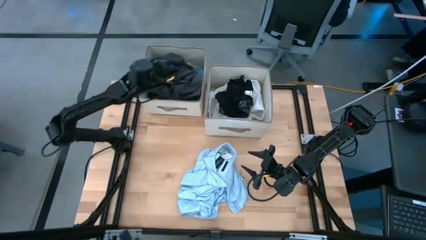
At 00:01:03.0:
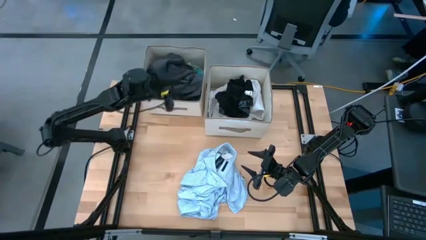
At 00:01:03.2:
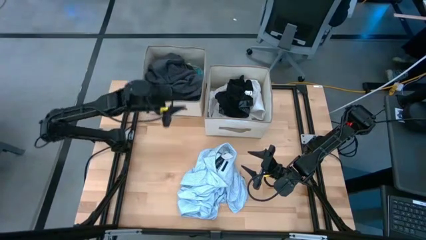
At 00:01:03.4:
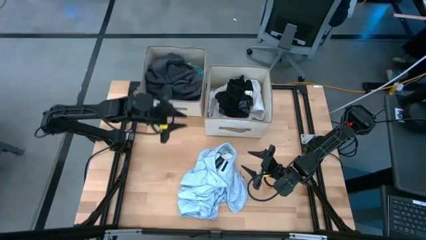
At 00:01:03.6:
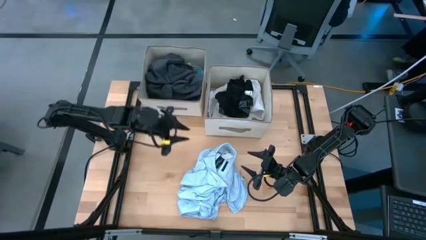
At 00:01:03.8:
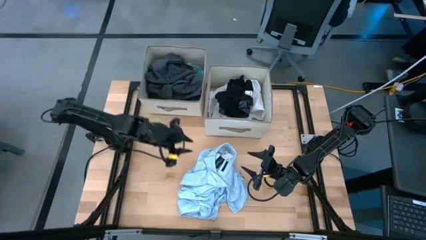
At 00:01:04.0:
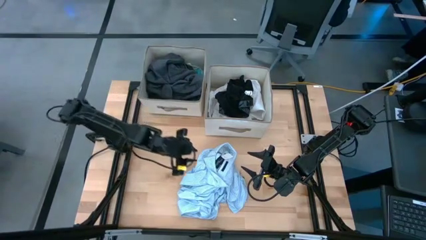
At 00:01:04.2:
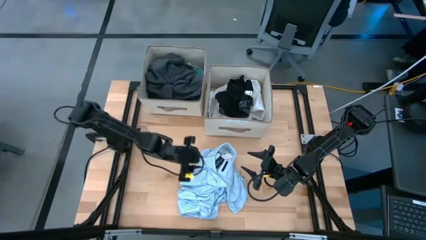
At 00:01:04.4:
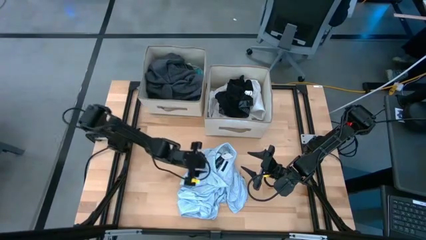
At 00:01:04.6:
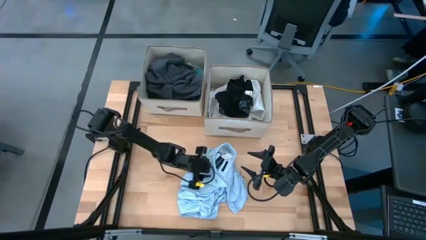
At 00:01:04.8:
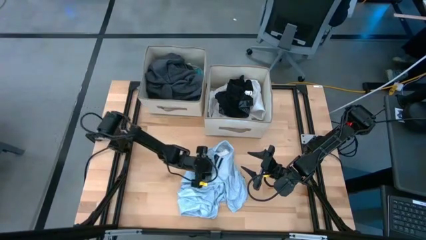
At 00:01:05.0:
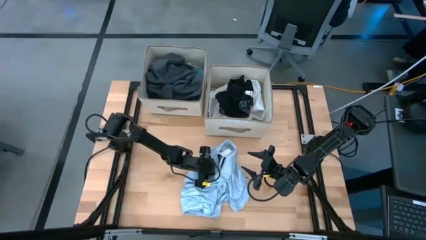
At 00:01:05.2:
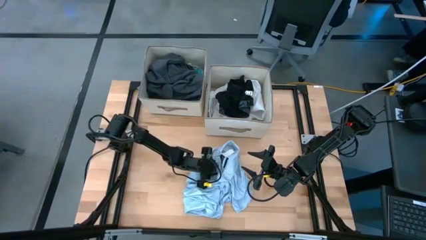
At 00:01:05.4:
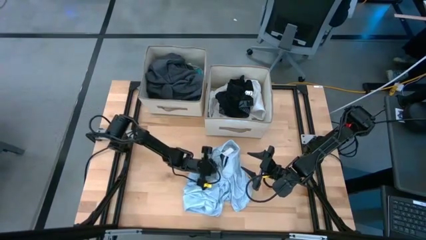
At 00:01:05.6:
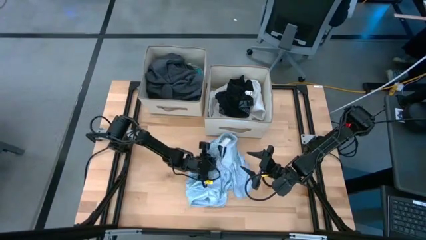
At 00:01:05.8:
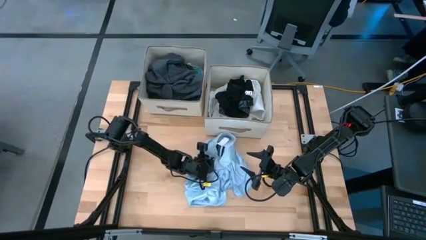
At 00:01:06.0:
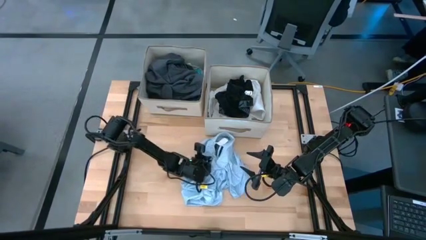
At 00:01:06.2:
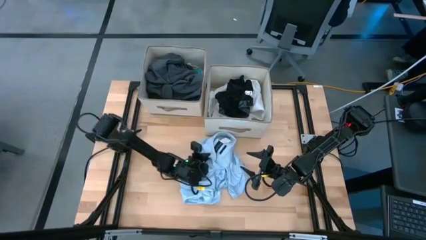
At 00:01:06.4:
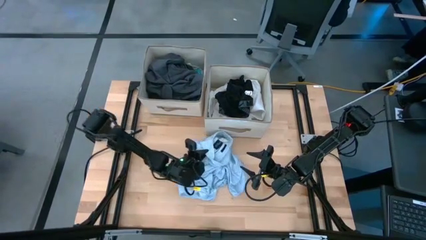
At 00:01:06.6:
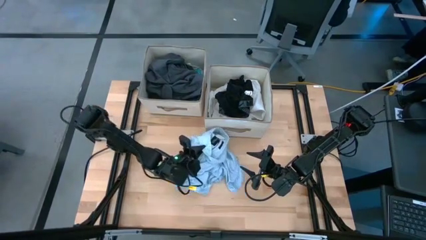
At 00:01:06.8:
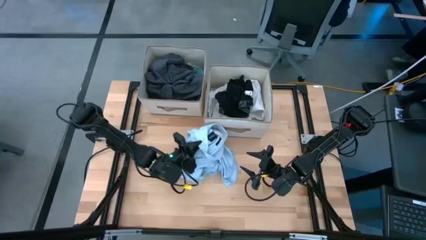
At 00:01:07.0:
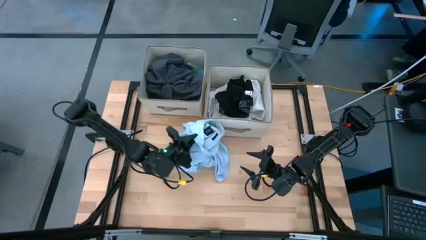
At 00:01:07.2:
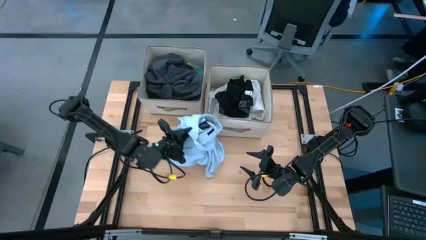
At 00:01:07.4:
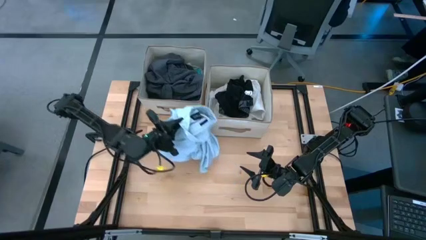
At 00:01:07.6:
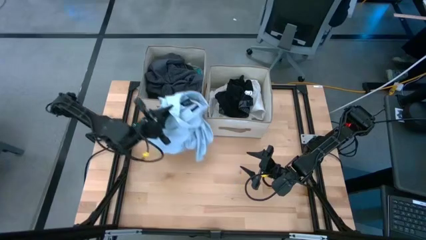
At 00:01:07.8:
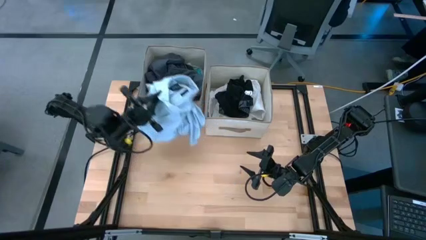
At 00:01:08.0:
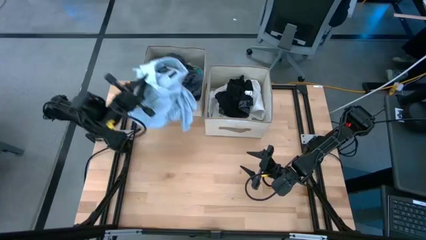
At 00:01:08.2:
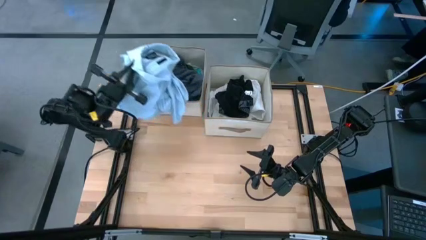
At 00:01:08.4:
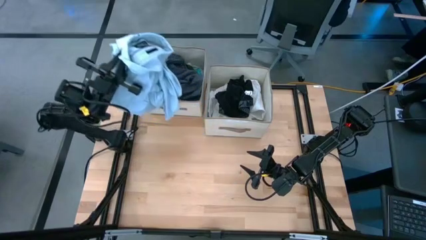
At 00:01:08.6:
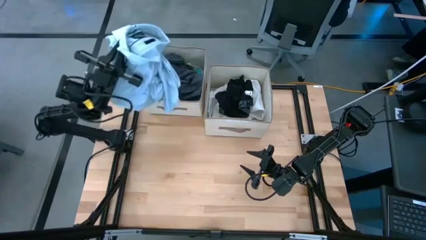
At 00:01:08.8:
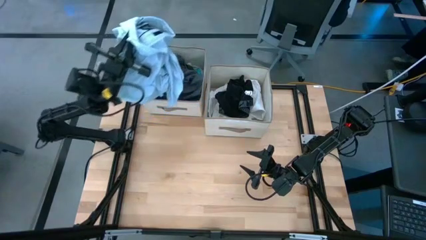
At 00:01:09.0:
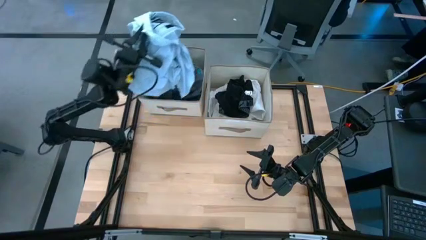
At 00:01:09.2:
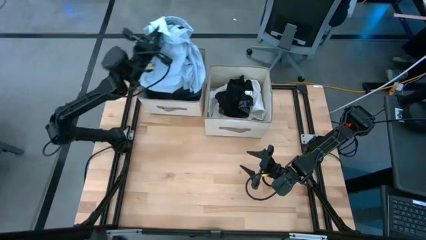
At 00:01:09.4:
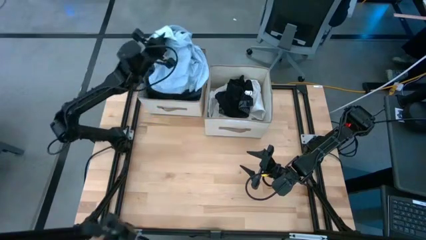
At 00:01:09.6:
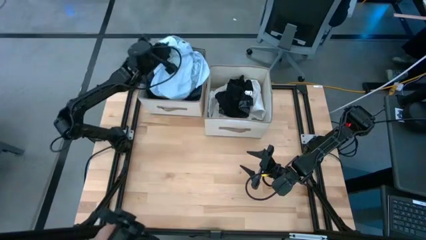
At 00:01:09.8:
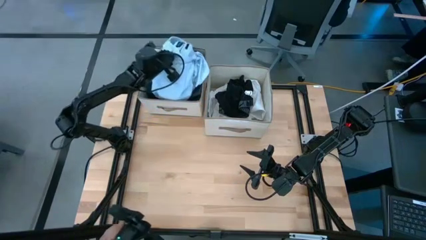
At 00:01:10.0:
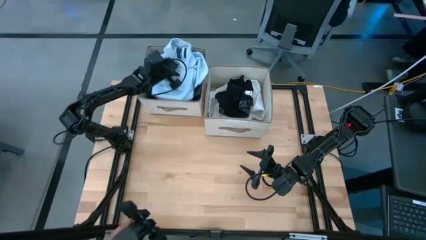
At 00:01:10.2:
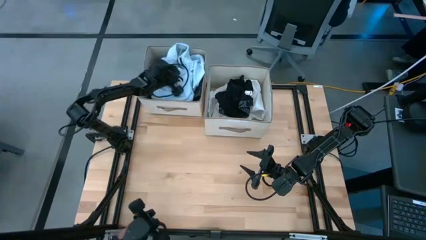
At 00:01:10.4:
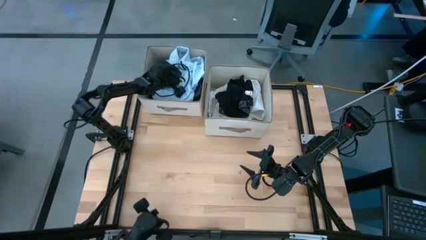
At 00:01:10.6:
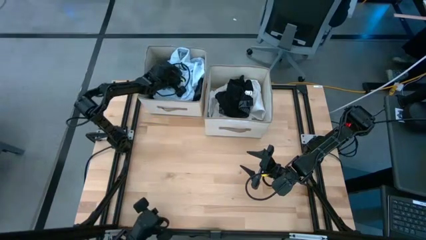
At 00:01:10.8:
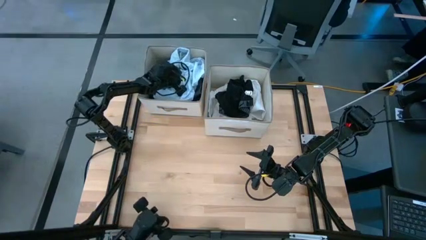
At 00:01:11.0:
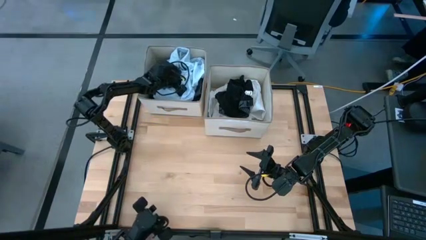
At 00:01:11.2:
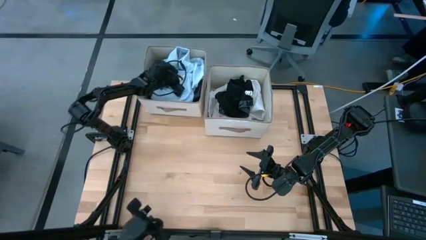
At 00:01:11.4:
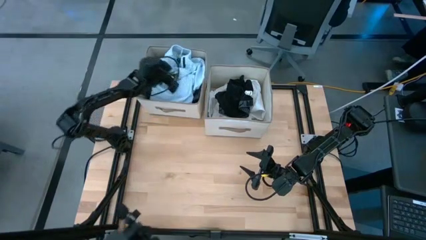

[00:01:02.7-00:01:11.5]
Task: Sort clothes
Put the blue polo shirt into the left laundry organizer

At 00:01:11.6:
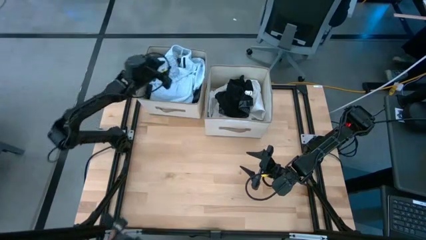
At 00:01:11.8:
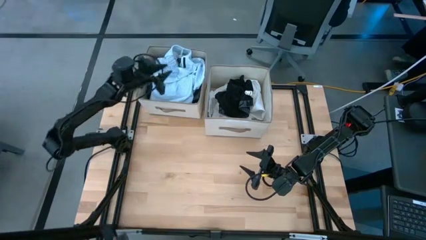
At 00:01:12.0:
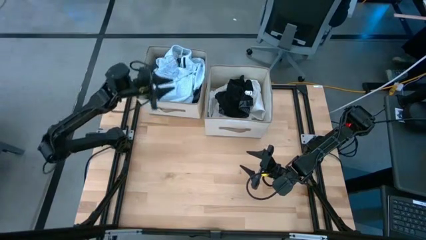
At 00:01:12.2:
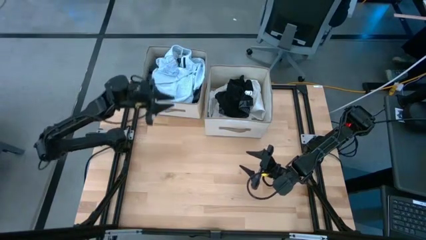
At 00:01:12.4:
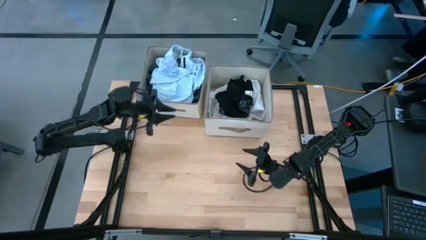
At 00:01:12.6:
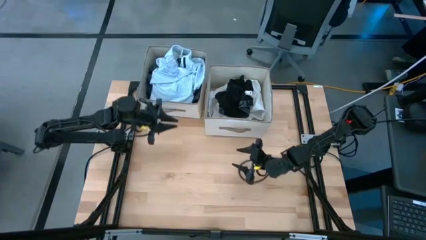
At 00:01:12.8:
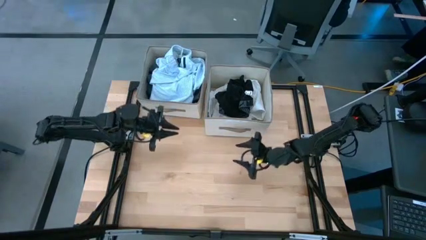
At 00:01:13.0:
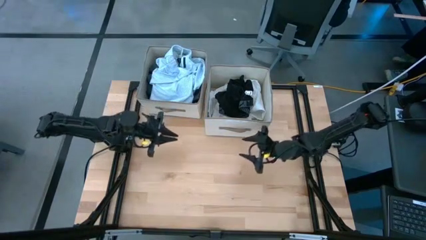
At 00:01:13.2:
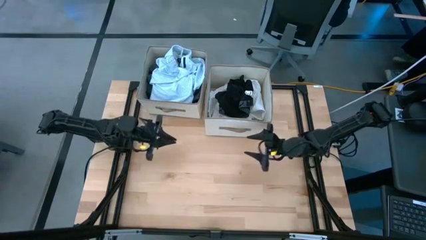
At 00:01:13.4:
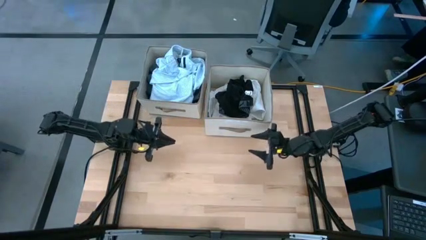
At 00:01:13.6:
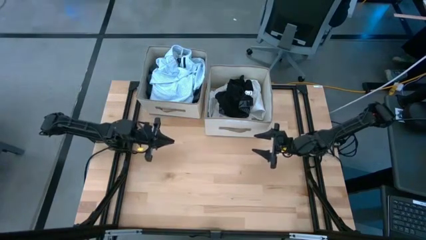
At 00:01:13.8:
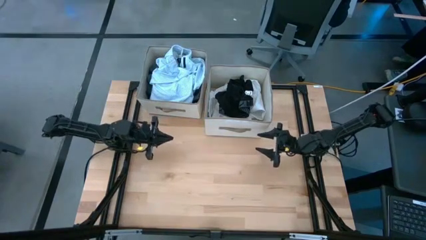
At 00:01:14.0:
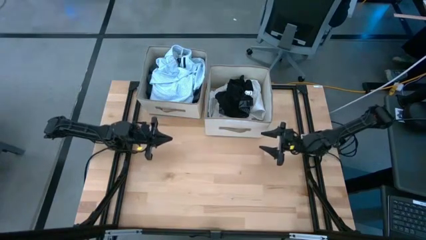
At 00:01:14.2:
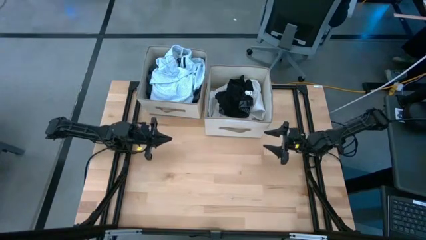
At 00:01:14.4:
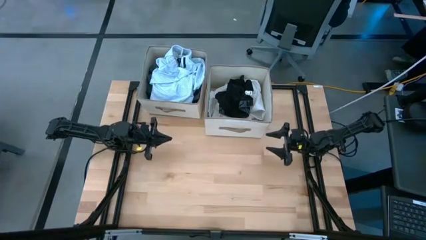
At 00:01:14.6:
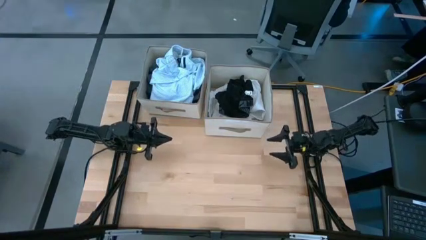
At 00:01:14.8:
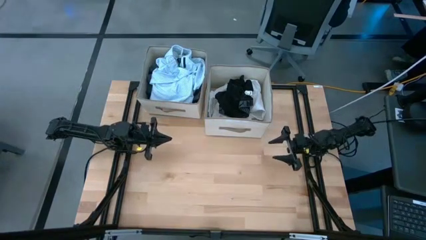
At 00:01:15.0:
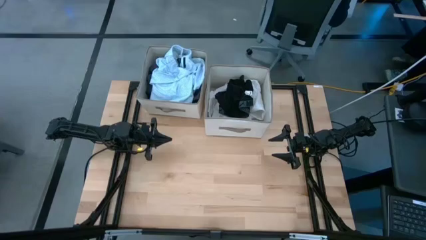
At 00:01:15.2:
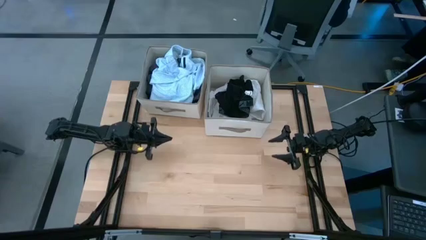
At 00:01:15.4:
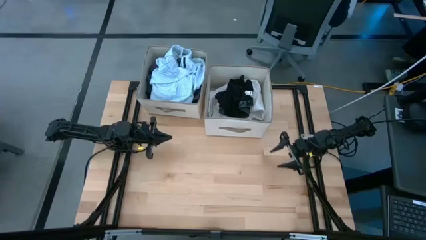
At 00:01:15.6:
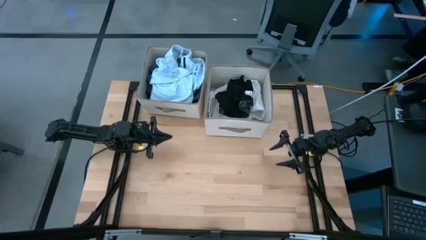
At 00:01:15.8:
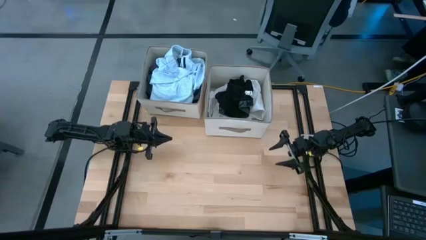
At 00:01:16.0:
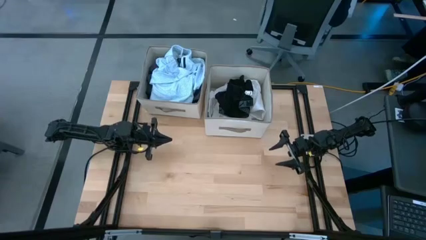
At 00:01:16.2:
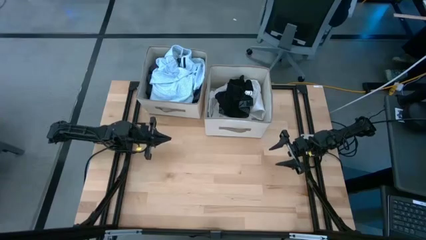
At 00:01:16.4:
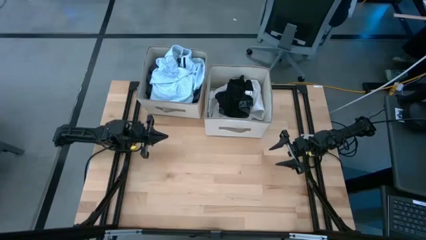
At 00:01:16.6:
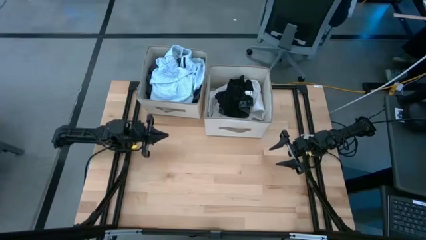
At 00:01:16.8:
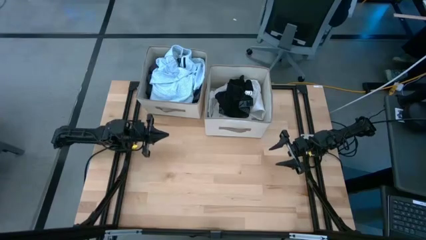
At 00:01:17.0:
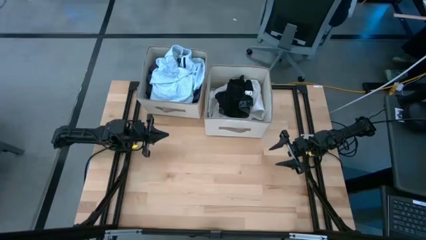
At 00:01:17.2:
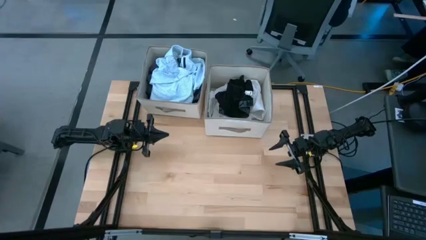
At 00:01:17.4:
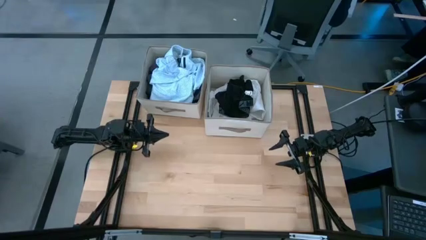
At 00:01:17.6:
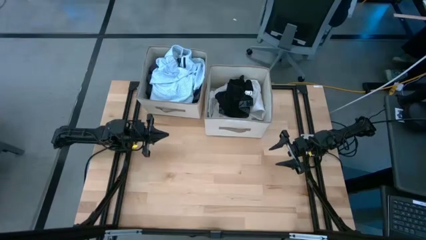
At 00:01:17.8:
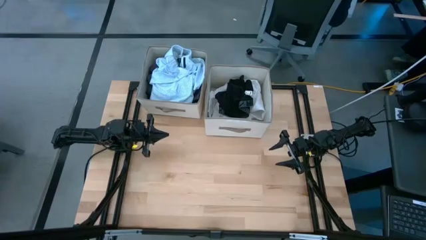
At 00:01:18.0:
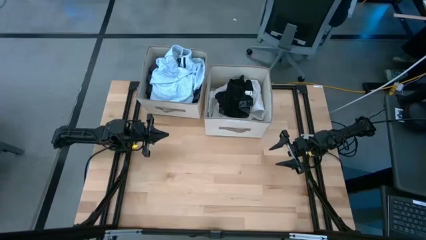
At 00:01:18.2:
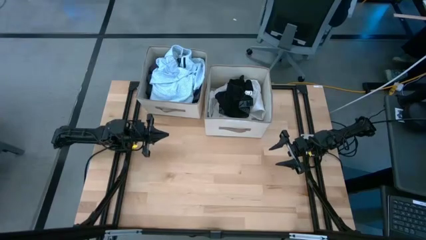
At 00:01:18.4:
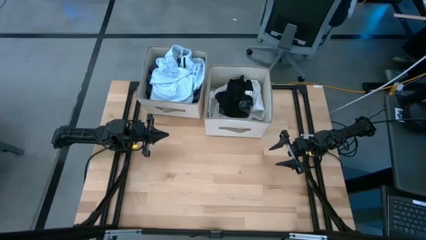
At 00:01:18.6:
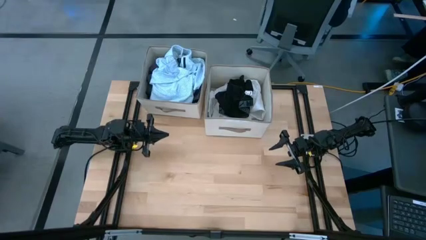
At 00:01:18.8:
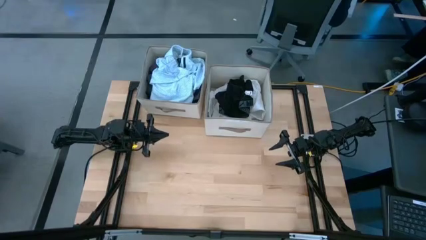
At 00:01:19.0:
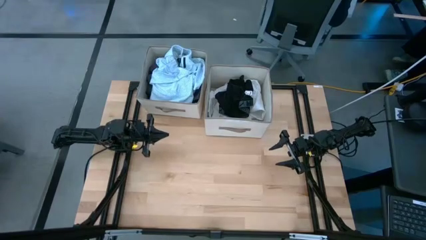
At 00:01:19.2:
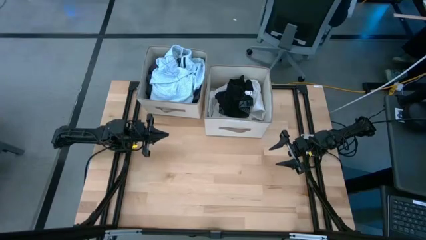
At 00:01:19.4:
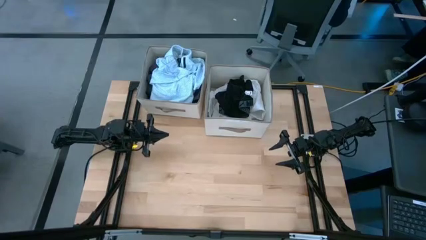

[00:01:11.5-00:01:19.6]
Return to Home Position
